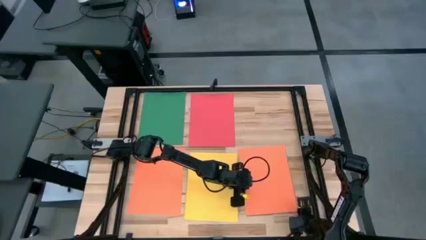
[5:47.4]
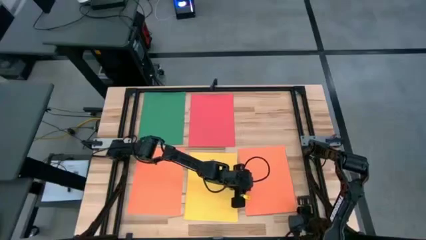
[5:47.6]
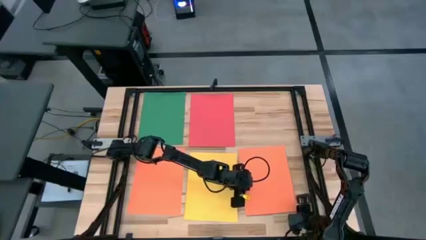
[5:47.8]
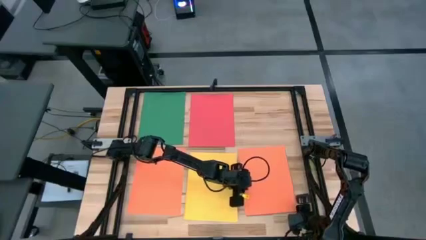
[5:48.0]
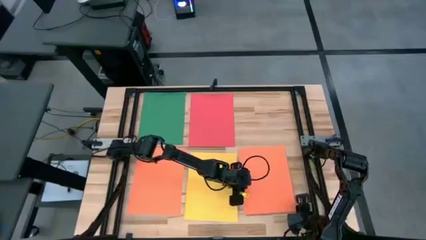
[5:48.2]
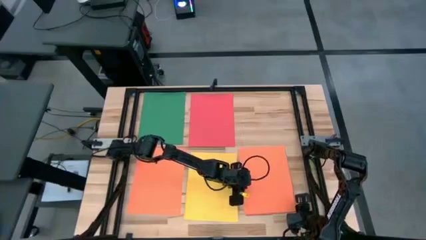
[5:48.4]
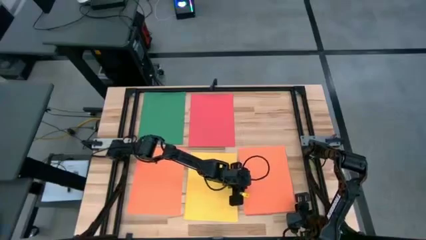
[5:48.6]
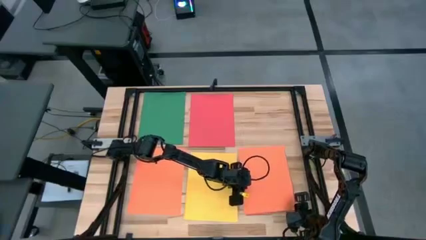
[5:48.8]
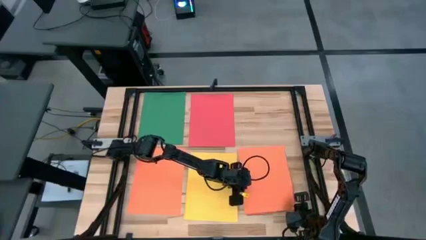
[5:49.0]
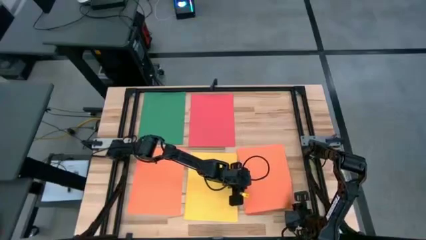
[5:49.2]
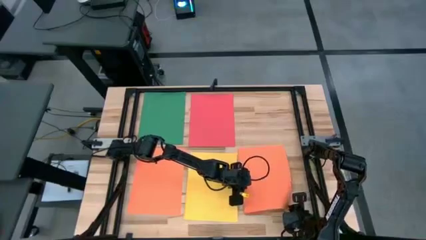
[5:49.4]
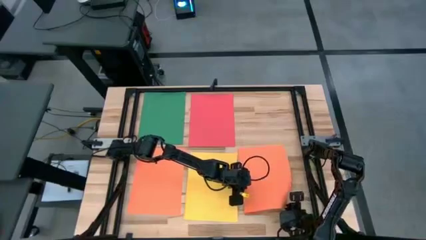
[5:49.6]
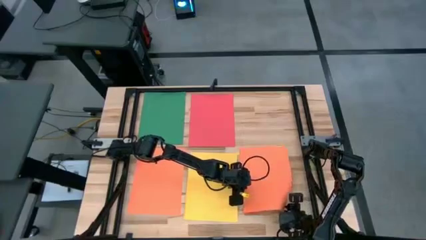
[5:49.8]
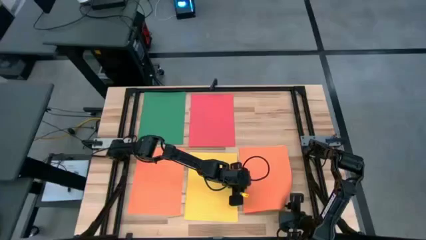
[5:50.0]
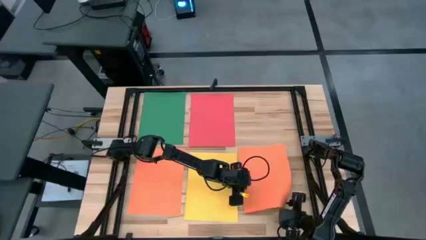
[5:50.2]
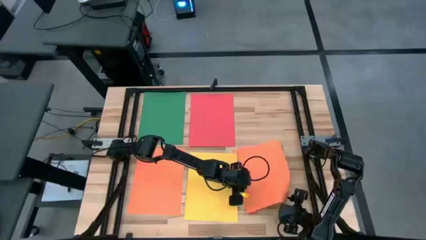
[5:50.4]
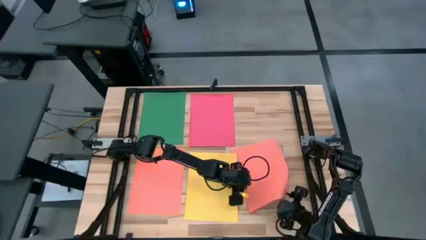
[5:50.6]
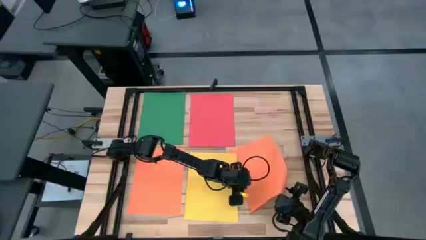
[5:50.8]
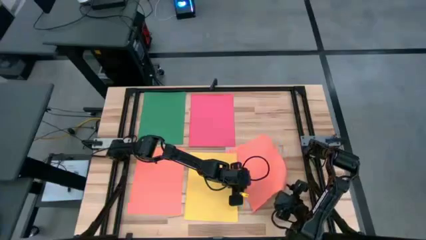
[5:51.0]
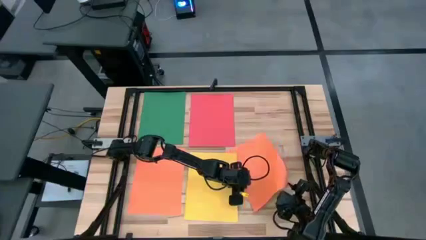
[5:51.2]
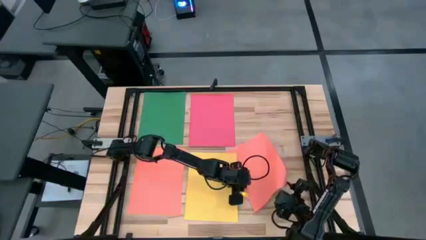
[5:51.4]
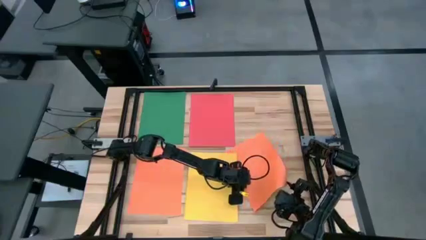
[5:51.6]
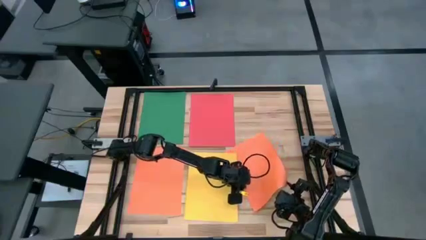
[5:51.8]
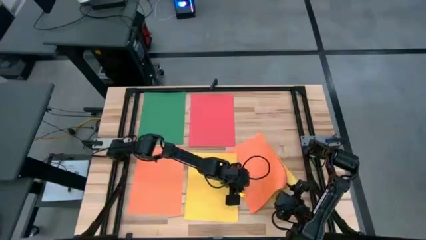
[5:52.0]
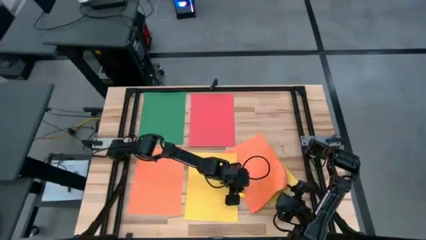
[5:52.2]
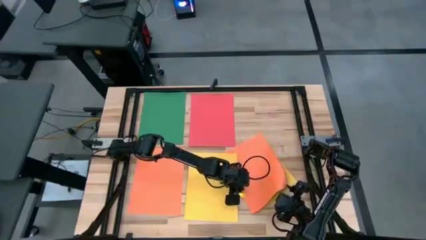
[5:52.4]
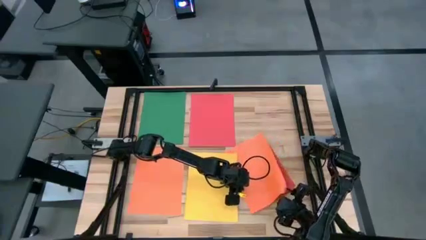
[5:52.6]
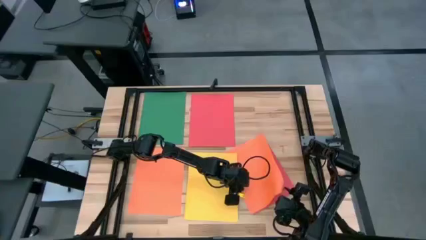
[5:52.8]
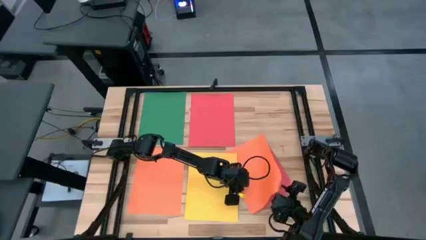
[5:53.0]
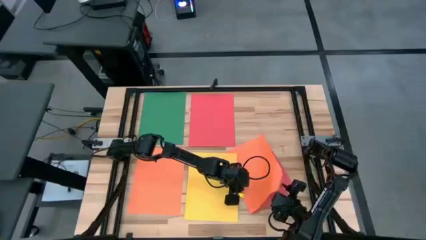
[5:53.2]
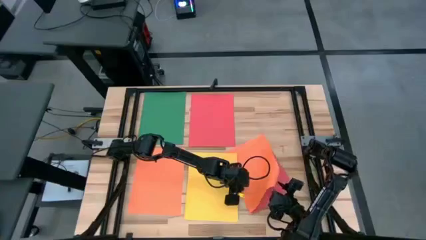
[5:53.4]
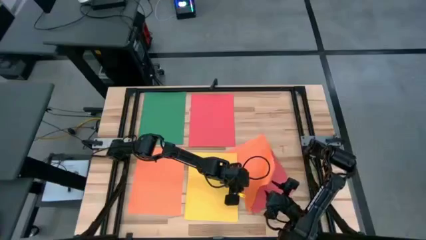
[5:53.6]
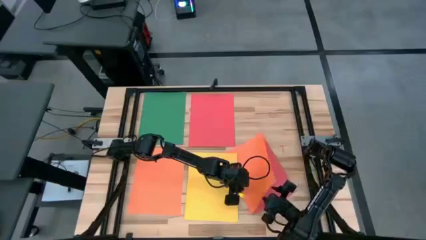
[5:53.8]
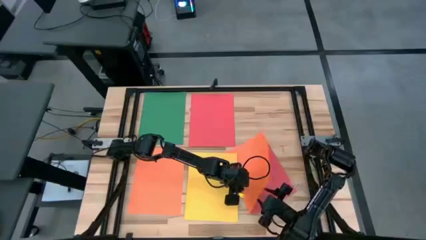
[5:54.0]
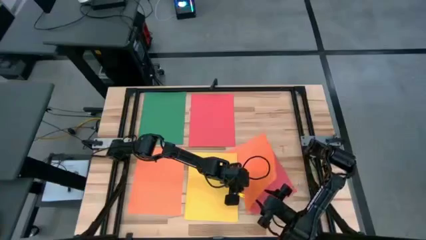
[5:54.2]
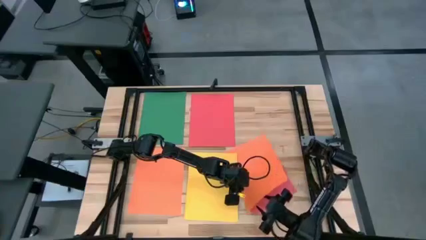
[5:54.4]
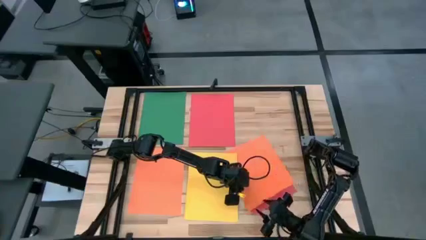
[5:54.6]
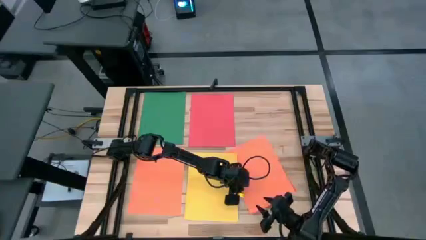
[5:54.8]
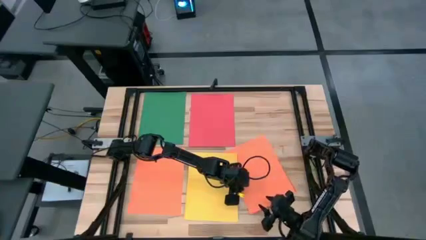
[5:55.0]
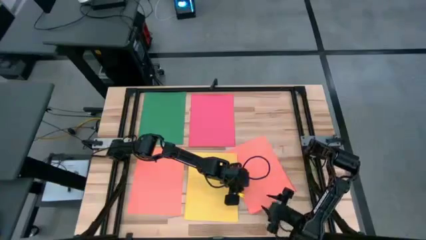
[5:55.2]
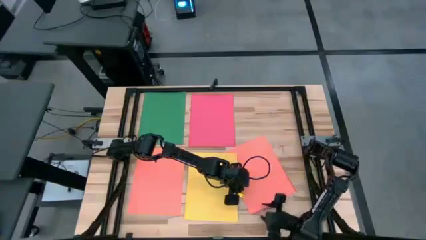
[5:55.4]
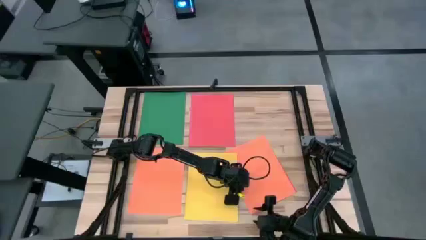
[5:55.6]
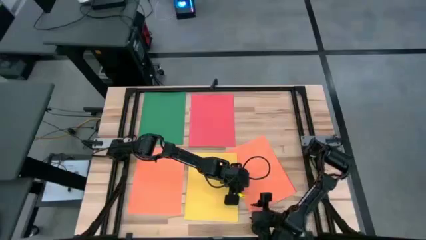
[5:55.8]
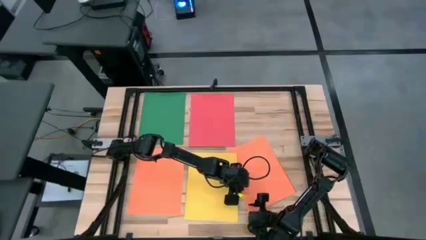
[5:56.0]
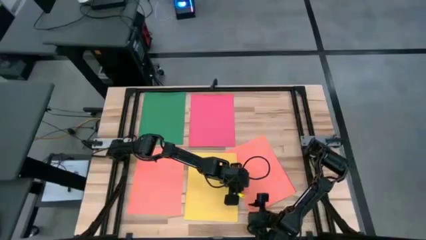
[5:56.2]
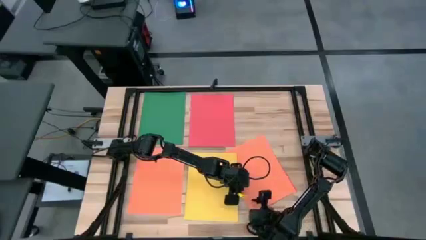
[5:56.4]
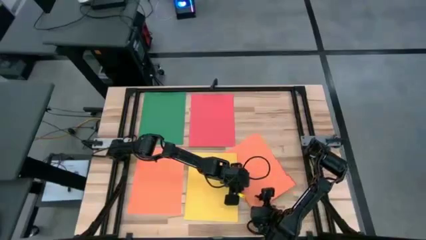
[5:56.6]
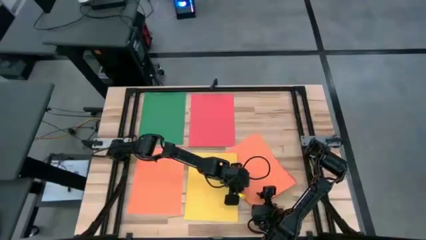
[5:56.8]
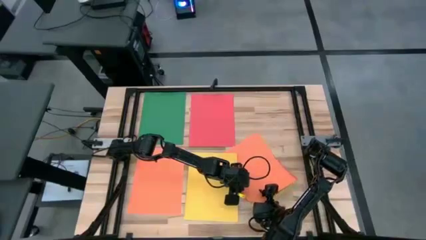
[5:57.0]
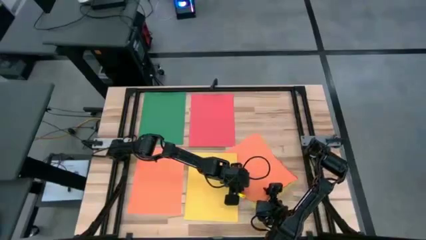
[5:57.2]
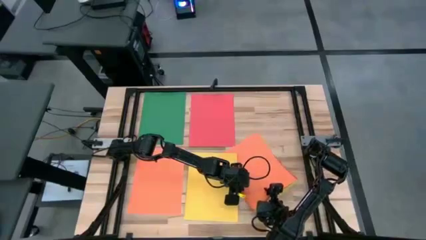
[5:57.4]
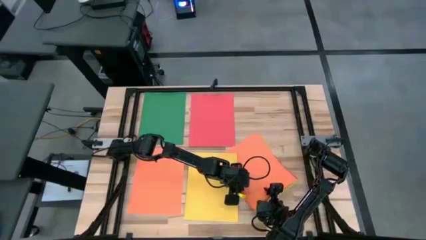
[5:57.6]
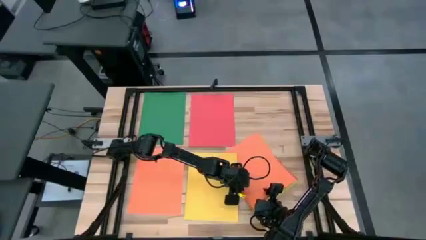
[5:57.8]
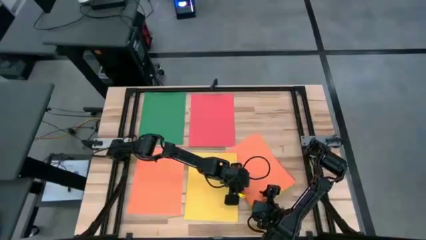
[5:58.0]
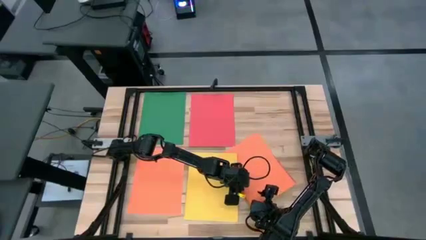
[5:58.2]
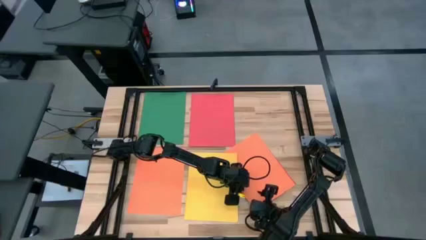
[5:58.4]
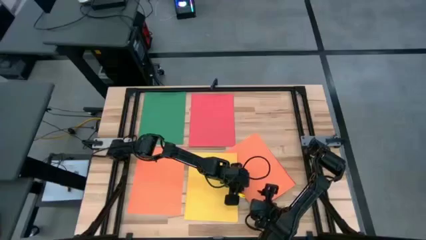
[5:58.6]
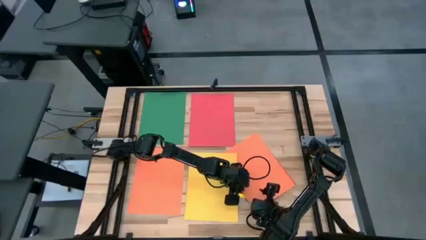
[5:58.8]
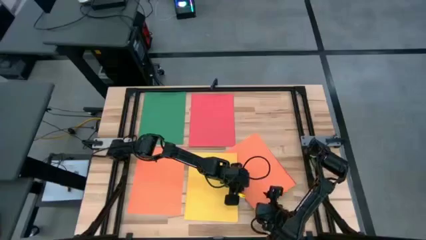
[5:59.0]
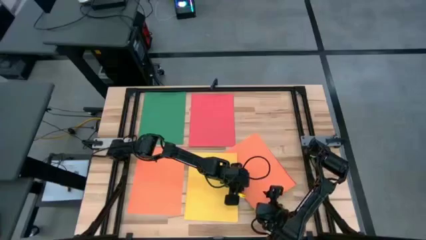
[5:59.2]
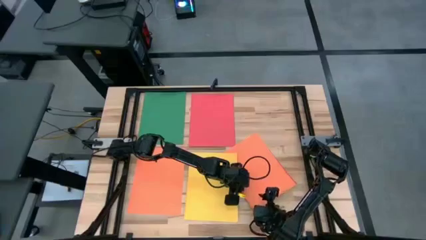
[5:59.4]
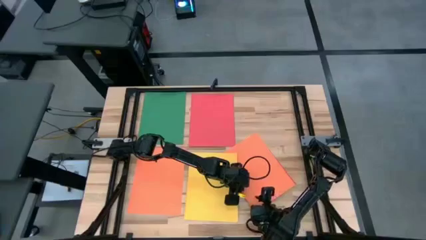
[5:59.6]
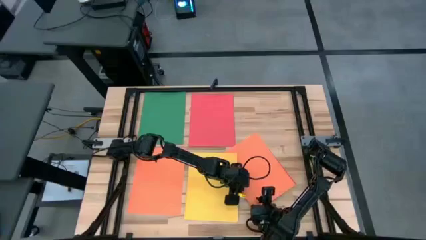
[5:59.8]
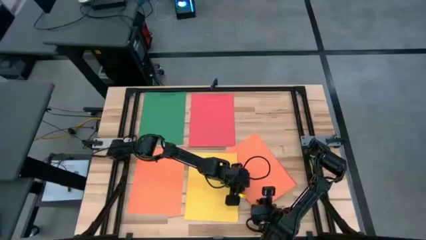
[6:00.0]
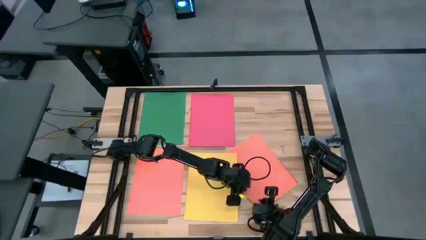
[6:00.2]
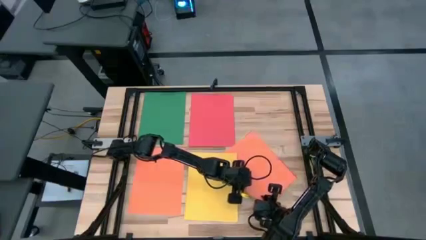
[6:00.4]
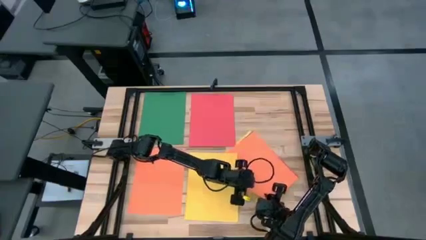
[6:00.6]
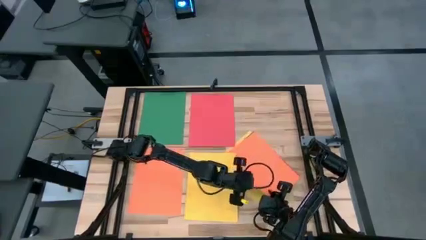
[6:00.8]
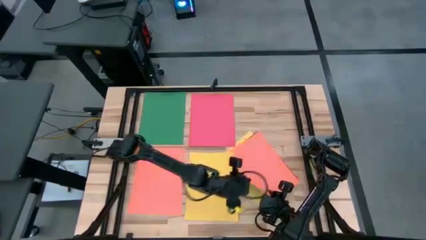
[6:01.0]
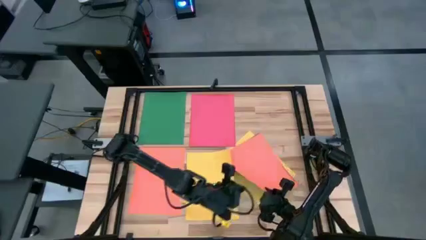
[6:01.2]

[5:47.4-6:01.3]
Task: Organize paper
Stack the orange paper on top of the orange paper
